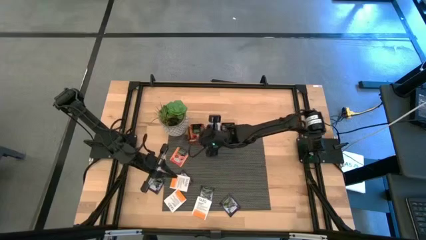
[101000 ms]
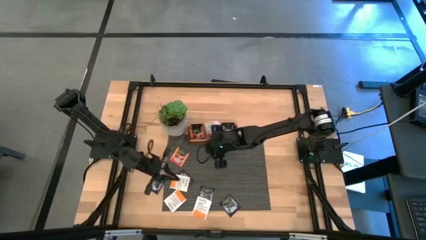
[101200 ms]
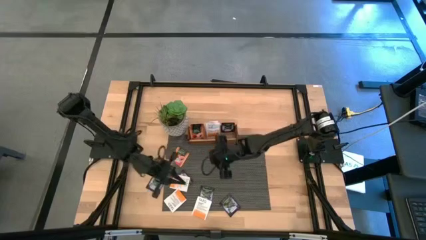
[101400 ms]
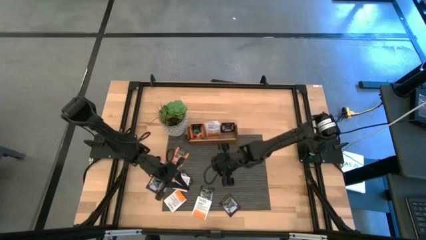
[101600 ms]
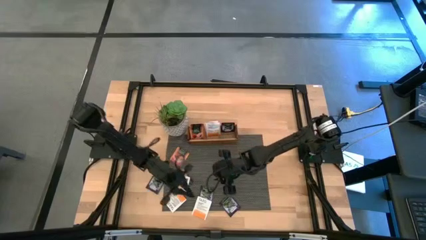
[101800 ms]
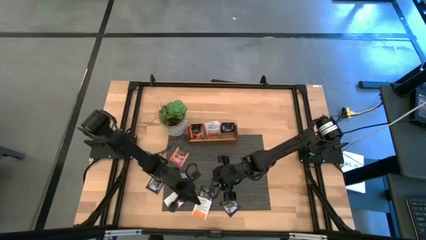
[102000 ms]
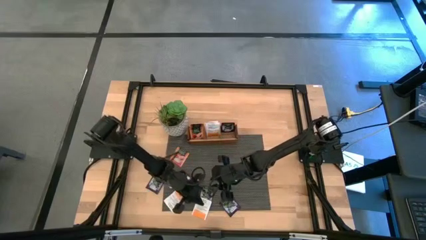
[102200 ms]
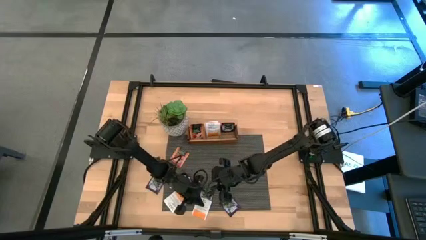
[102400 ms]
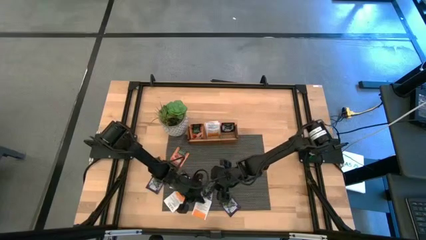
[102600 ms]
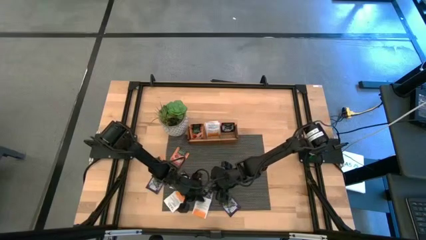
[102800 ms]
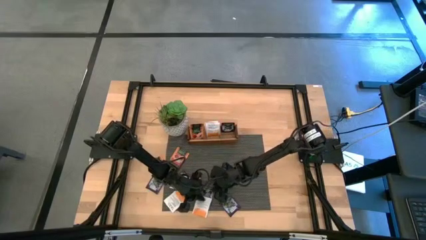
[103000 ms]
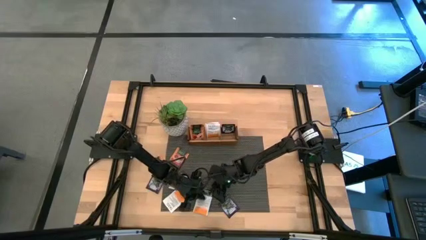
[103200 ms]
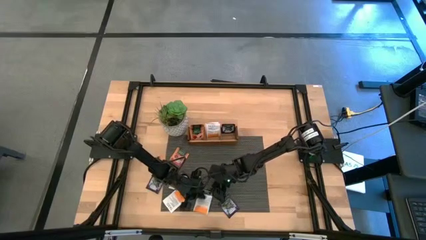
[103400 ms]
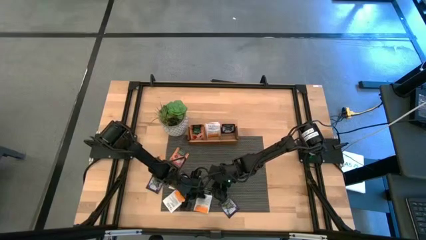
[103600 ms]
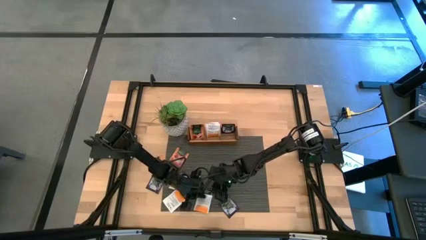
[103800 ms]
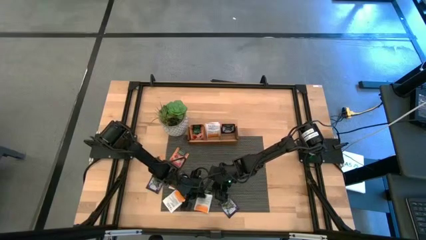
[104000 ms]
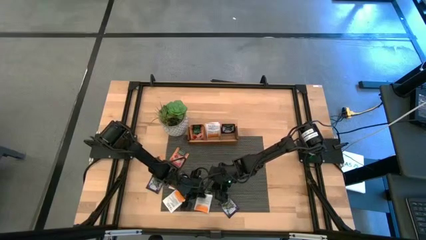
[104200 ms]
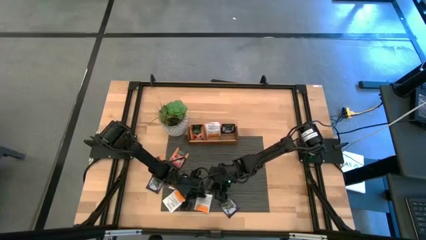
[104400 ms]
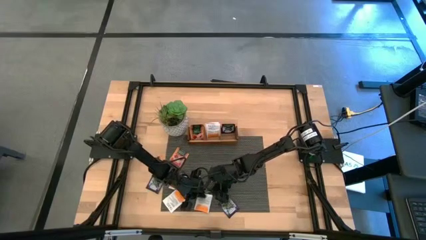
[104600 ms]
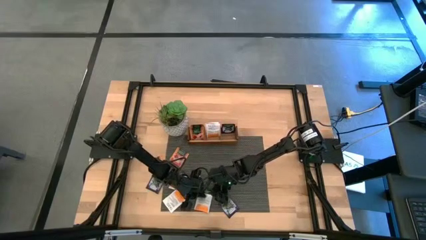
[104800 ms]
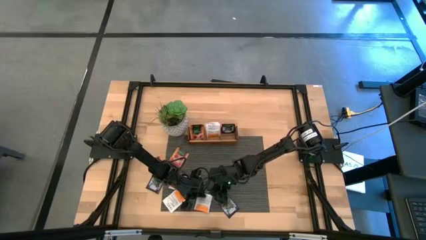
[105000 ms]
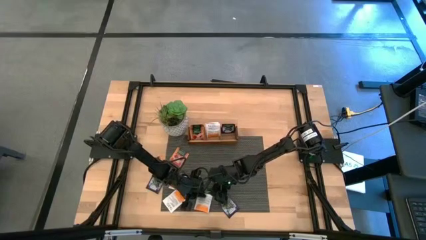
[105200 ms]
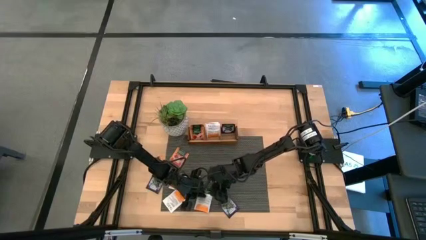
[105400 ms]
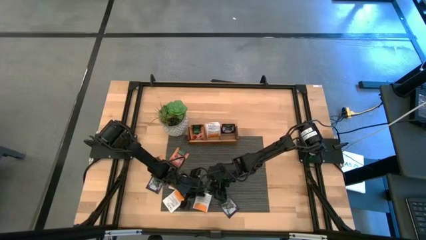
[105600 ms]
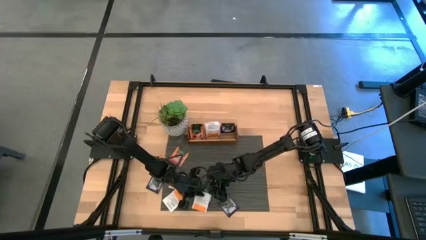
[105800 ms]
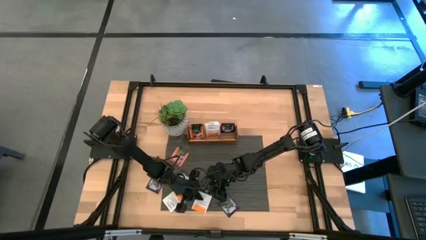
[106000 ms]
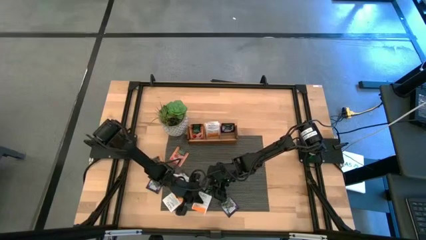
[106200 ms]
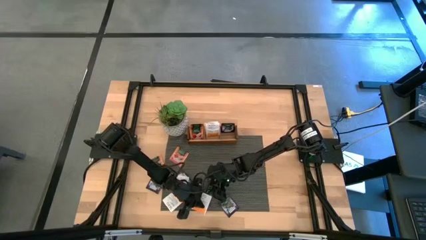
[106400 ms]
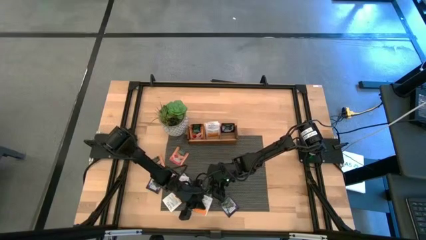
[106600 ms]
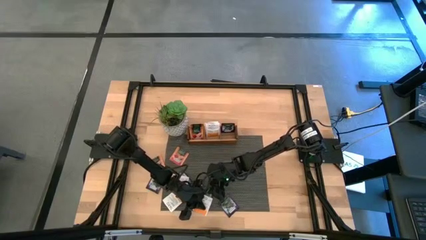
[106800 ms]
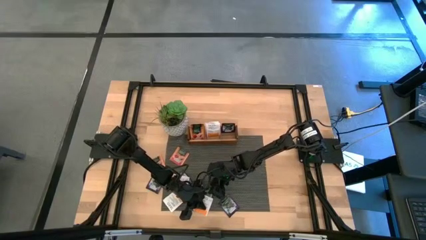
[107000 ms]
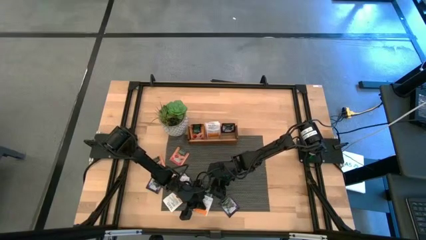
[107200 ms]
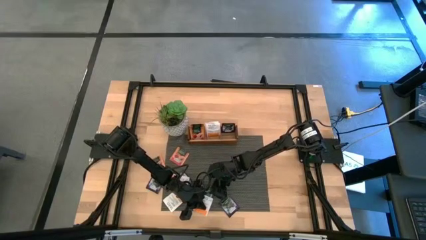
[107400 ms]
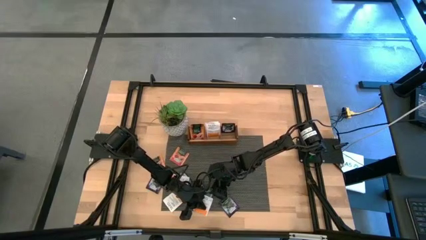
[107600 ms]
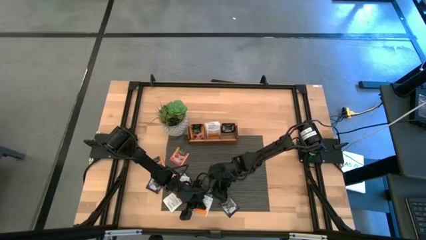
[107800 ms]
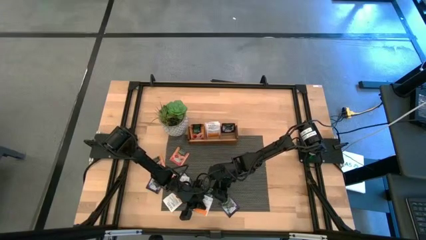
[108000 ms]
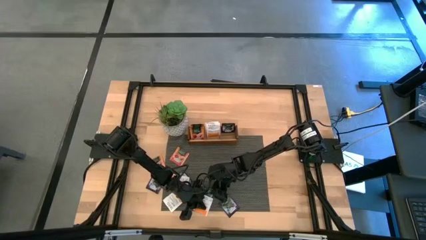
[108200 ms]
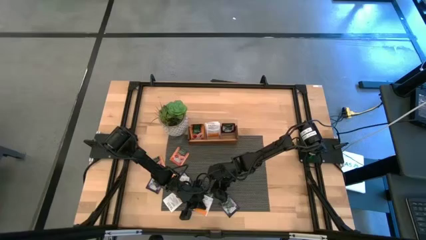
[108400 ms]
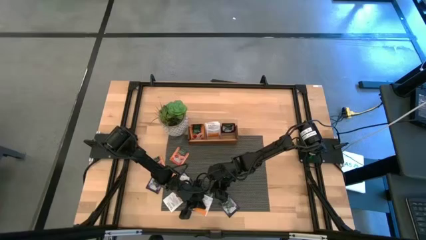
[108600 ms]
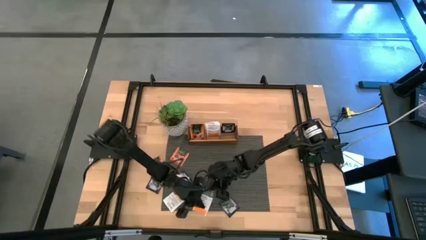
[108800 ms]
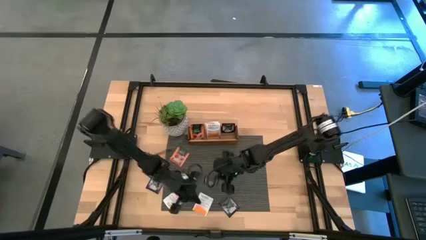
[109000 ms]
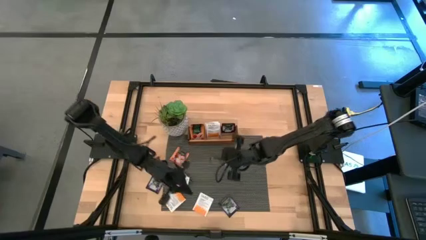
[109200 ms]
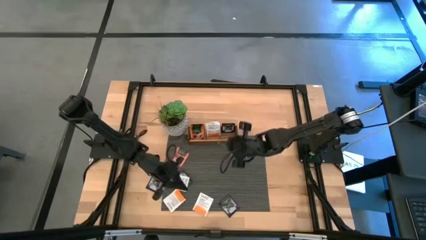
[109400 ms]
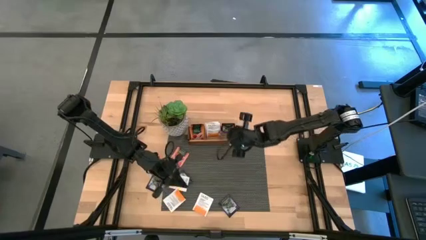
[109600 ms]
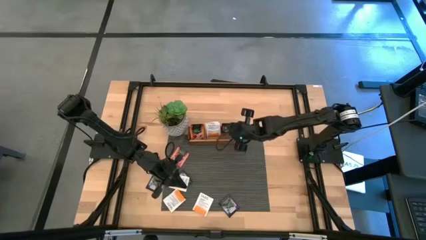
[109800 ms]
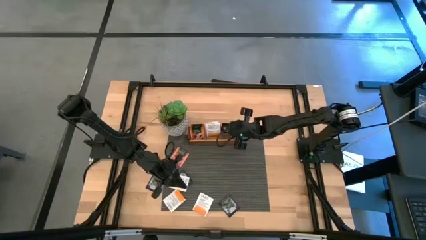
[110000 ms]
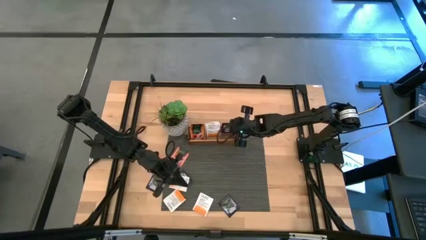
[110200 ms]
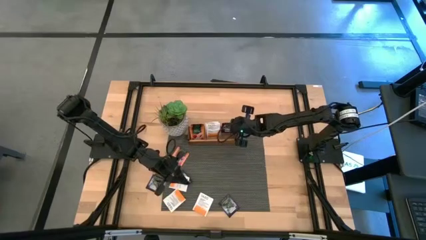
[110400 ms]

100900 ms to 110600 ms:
Task: Pick & Place Tea
Put the black tea bag into the right slot of the wooden organizer

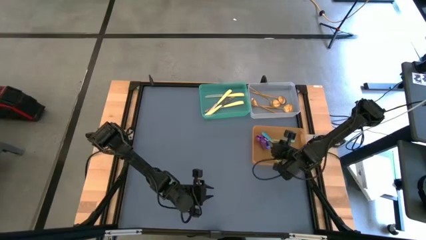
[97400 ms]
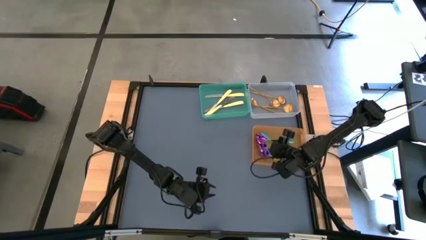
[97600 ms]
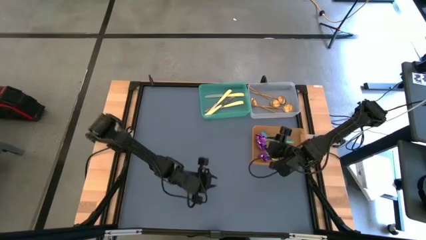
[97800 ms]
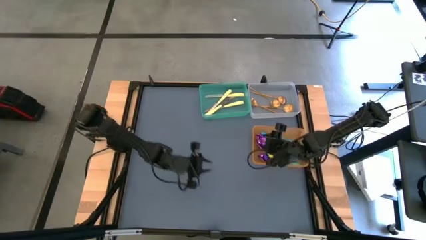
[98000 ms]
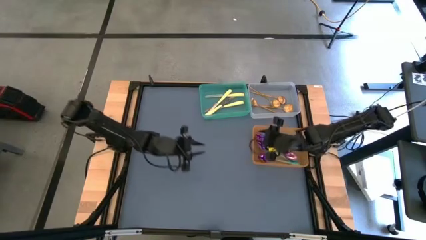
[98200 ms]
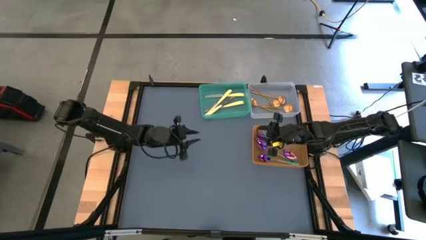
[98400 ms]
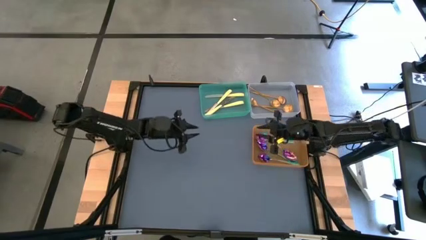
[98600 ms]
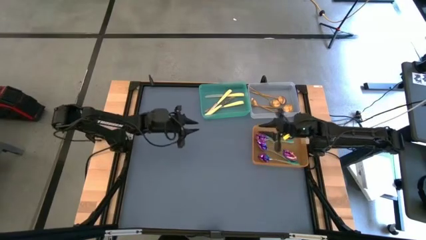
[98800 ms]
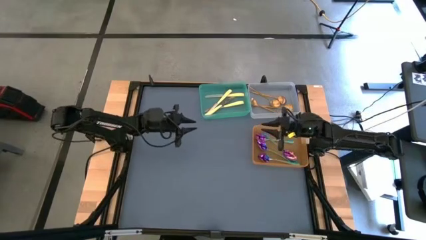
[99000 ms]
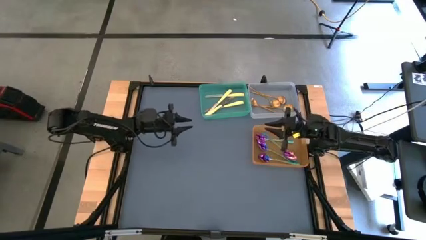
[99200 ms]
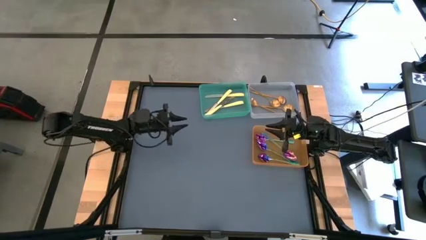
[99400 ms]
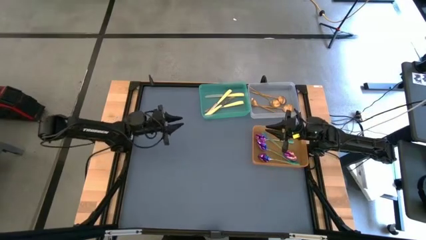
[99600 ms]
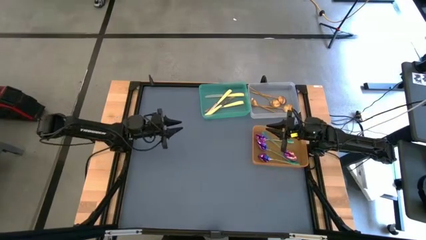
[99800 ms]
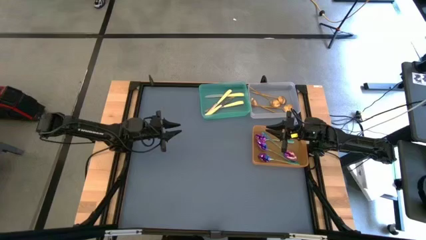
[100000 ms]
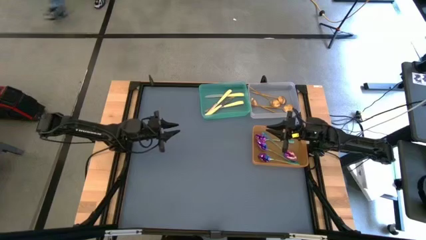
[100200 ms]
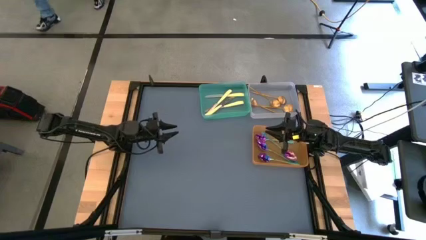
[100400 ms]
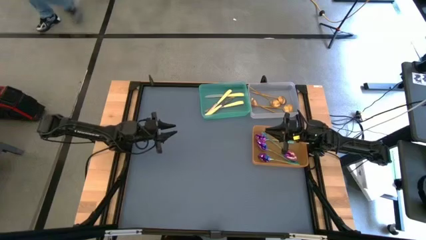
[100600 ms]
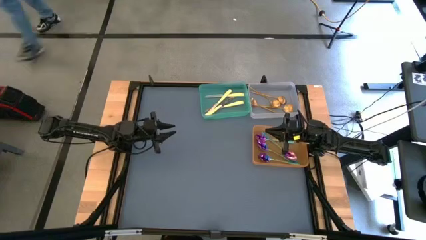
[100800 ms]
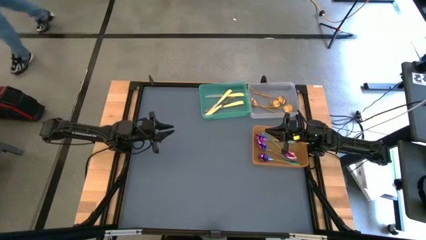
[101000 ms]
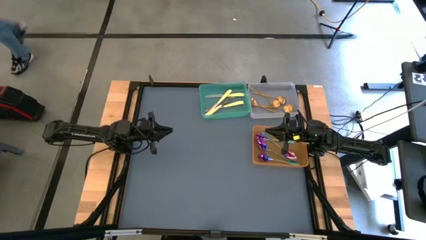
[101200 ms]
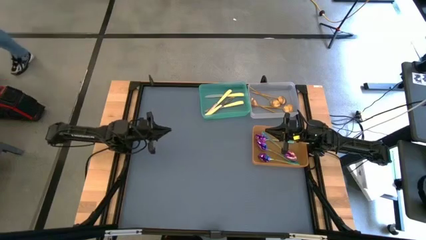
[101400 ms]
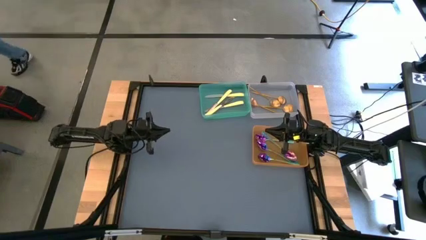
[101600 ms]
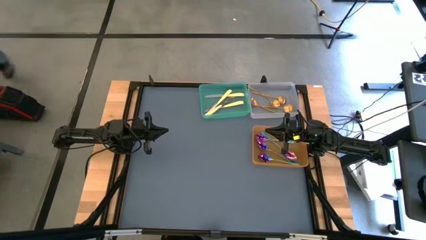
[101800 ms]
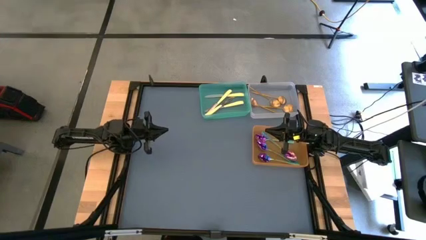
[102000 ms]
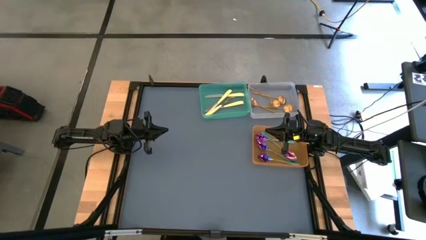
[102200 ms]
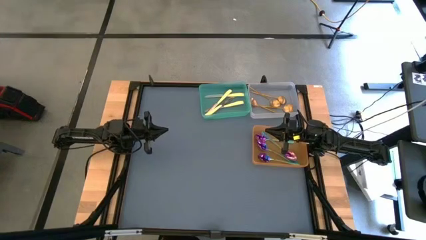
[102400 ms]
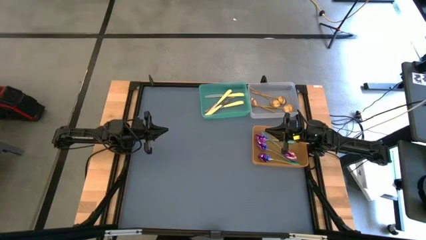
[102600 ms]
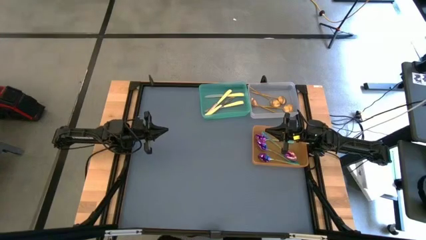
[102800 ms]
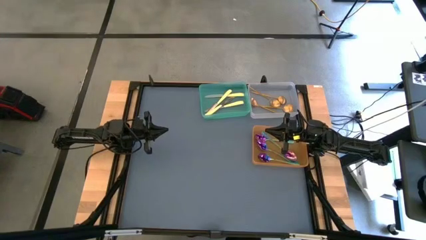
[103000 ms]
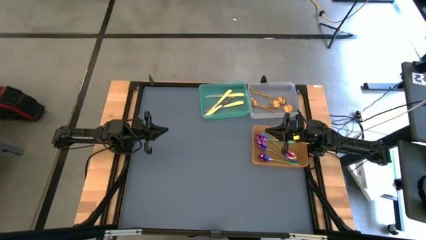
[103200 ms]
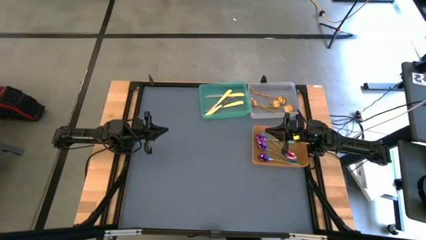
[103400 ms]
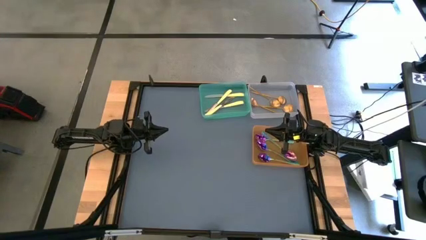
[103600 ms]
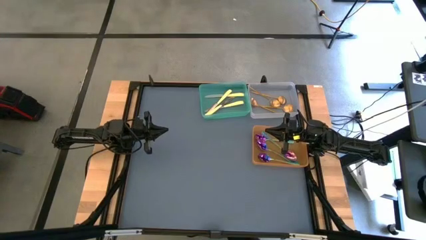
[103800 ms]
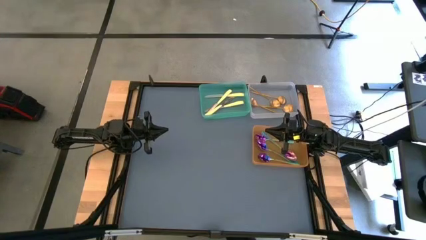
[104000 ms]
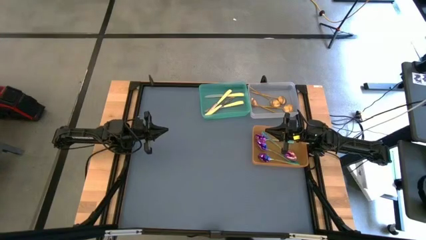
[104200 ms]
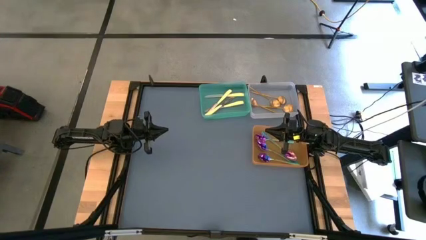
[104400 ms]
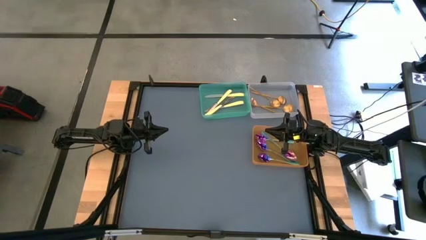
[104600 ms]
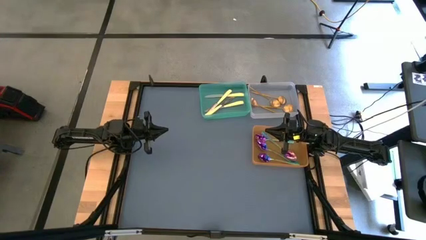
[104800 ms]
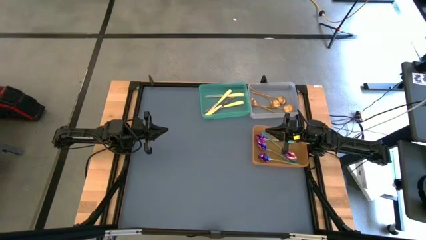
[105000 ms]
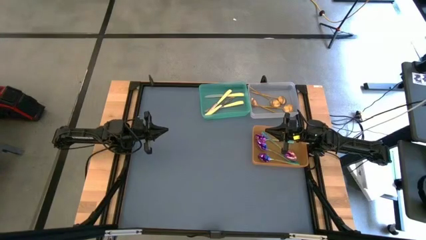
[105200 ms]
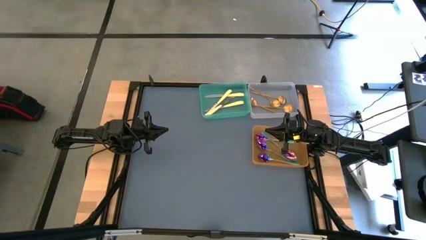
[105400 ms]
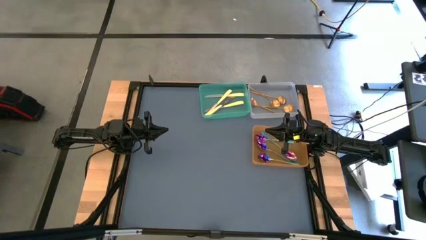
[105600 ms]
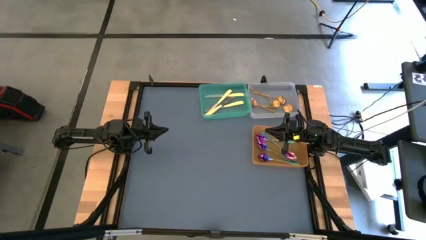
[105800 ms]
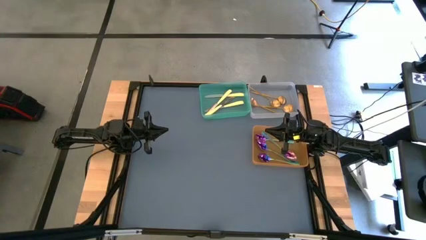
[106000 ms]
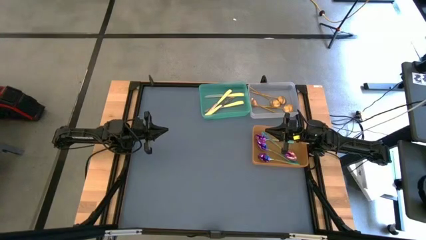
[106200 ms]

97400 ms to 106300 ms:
Task: Sort silverware by color (type)
Return to Home Position
